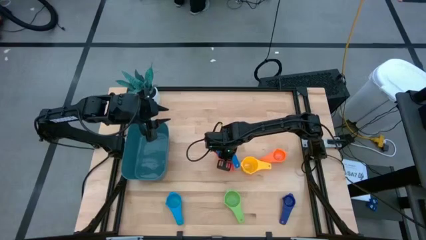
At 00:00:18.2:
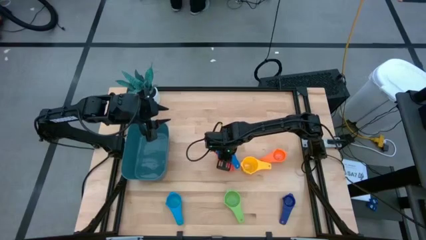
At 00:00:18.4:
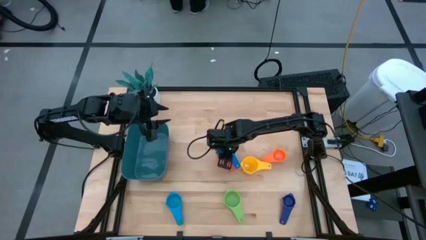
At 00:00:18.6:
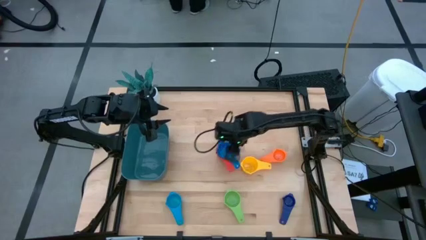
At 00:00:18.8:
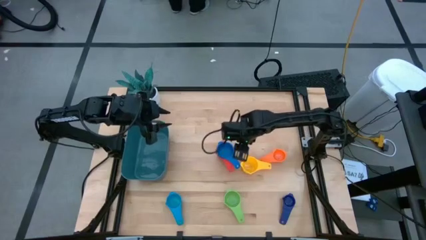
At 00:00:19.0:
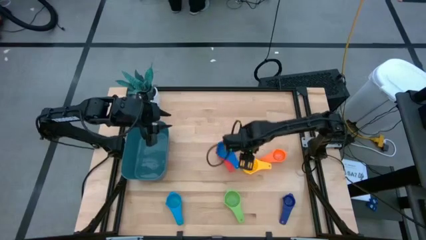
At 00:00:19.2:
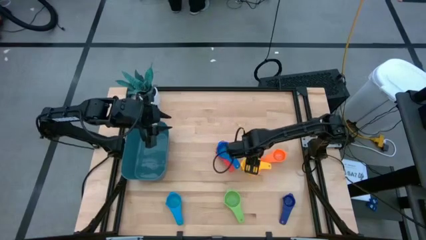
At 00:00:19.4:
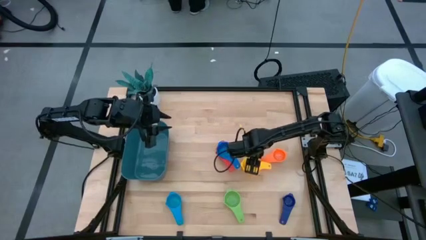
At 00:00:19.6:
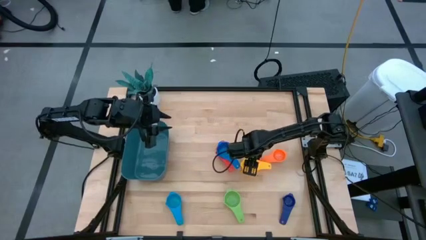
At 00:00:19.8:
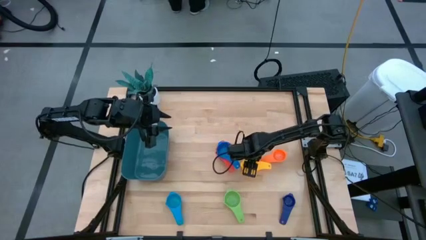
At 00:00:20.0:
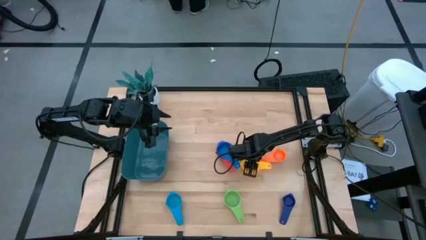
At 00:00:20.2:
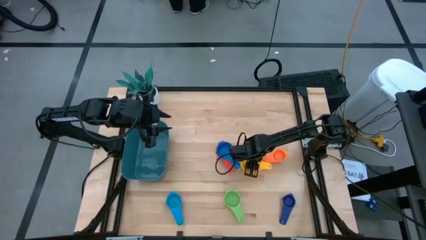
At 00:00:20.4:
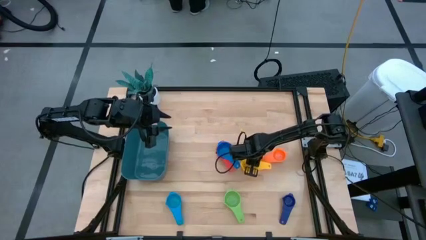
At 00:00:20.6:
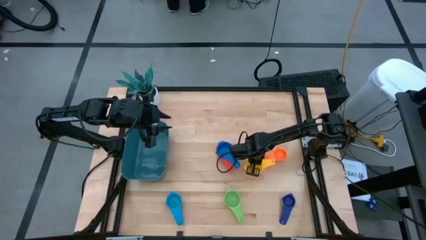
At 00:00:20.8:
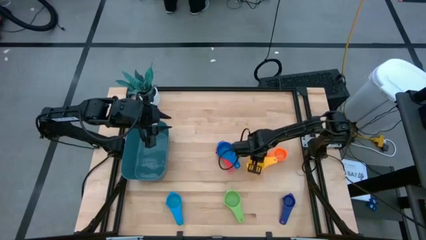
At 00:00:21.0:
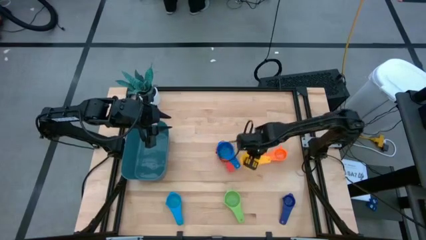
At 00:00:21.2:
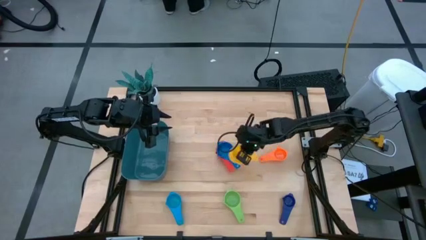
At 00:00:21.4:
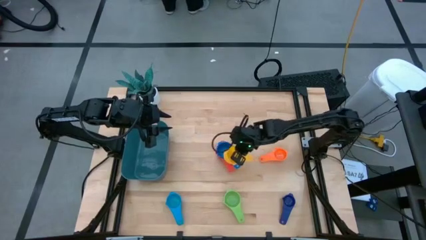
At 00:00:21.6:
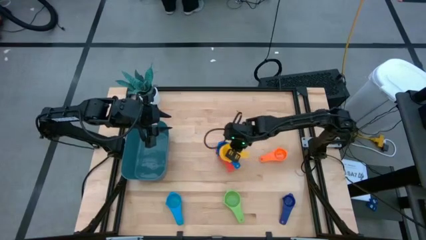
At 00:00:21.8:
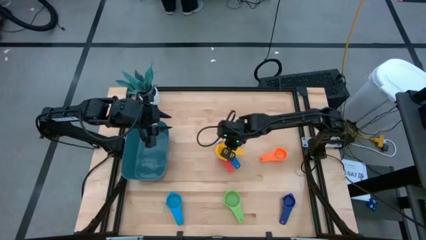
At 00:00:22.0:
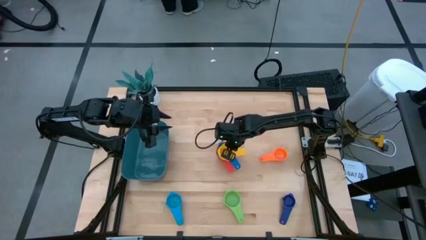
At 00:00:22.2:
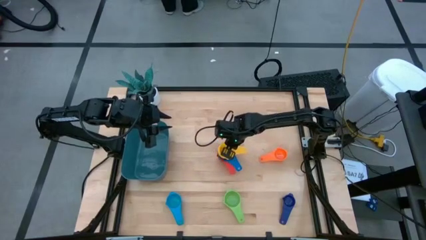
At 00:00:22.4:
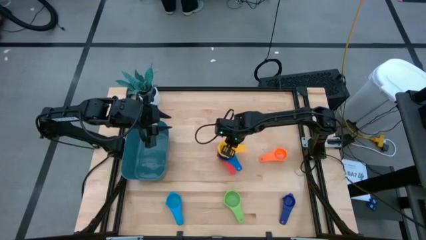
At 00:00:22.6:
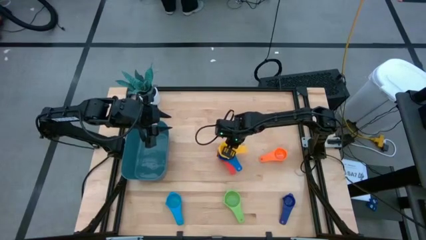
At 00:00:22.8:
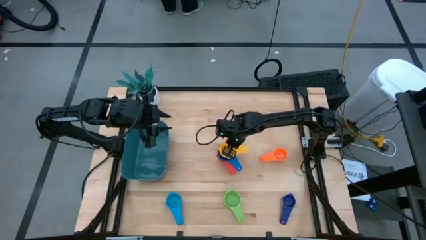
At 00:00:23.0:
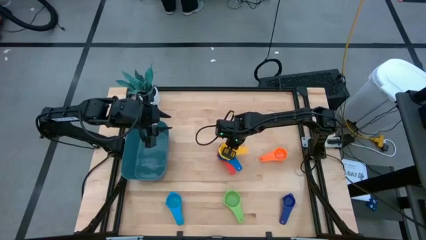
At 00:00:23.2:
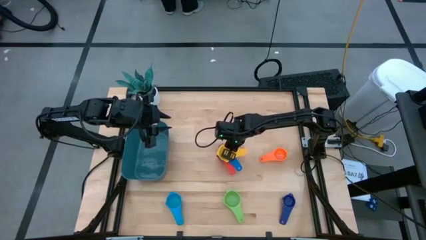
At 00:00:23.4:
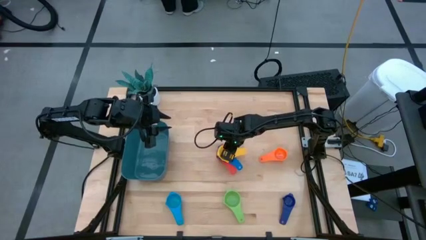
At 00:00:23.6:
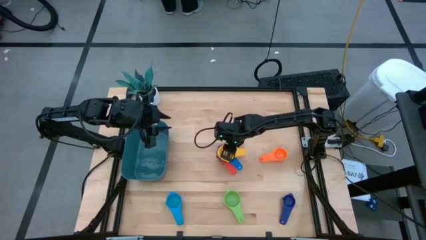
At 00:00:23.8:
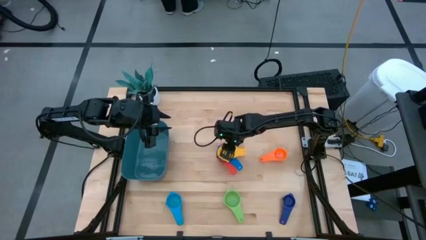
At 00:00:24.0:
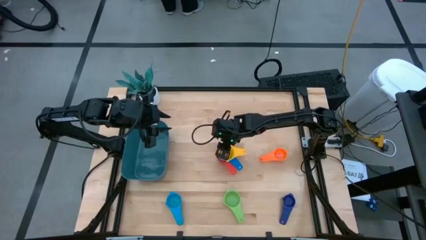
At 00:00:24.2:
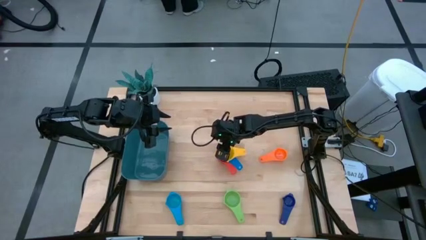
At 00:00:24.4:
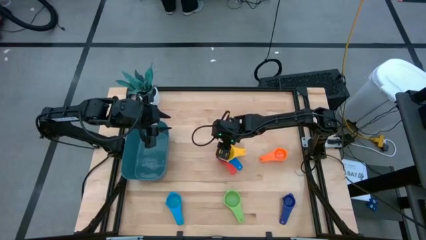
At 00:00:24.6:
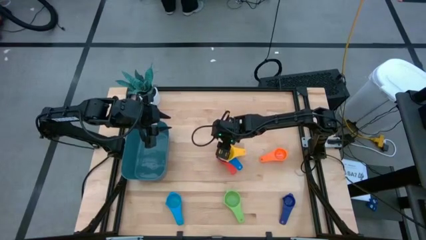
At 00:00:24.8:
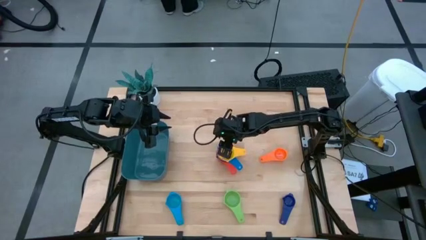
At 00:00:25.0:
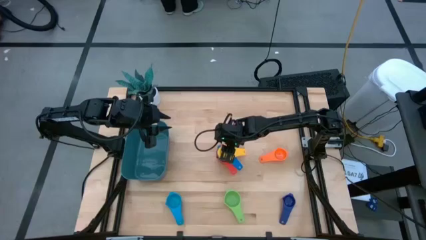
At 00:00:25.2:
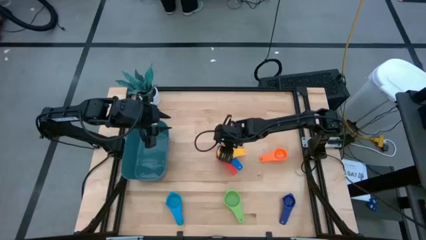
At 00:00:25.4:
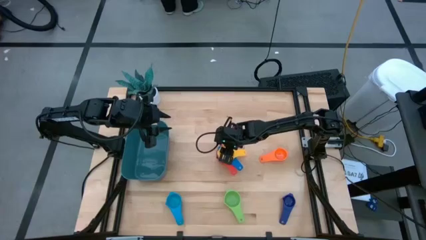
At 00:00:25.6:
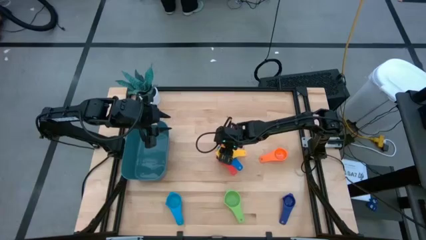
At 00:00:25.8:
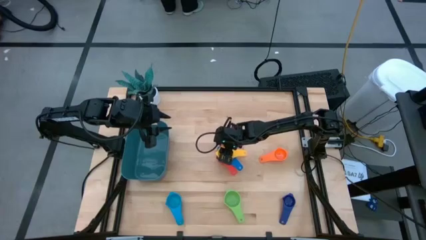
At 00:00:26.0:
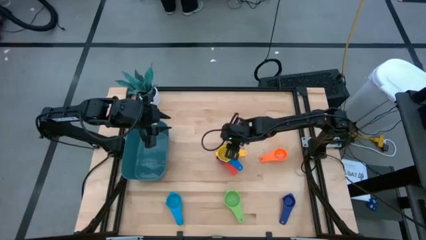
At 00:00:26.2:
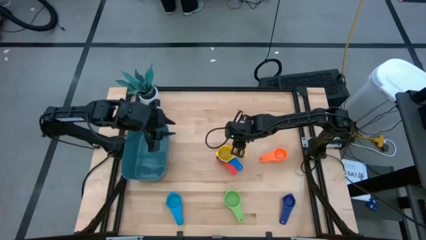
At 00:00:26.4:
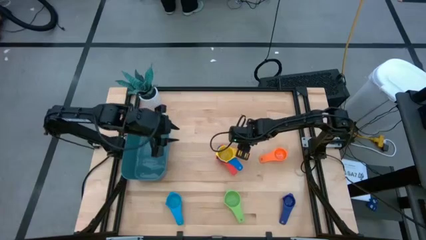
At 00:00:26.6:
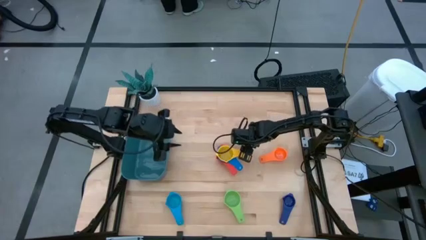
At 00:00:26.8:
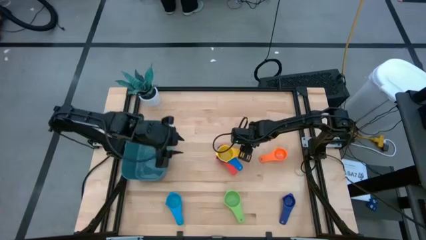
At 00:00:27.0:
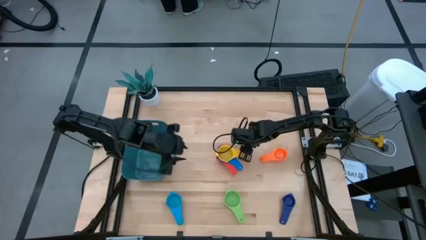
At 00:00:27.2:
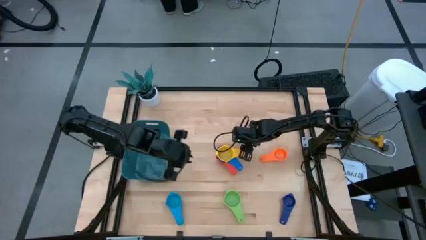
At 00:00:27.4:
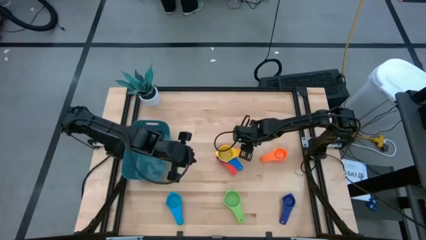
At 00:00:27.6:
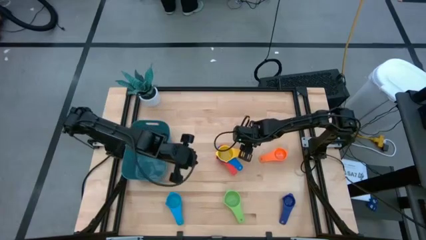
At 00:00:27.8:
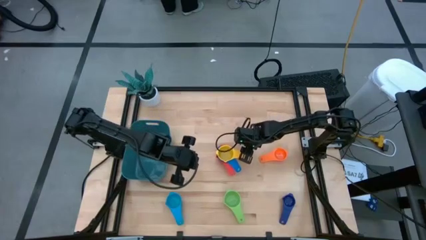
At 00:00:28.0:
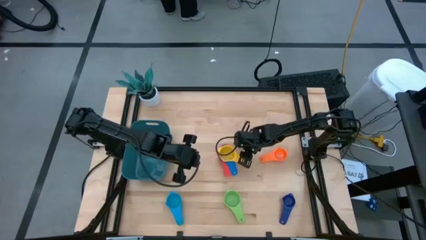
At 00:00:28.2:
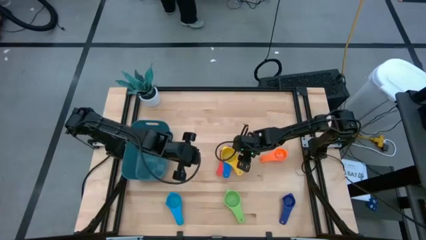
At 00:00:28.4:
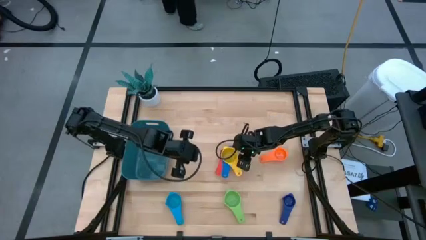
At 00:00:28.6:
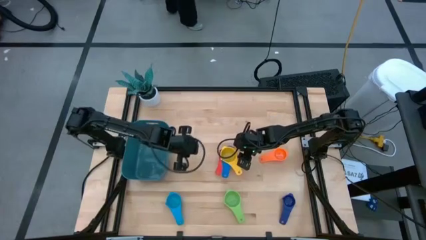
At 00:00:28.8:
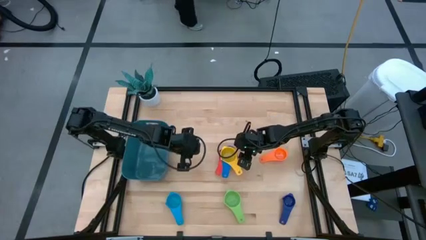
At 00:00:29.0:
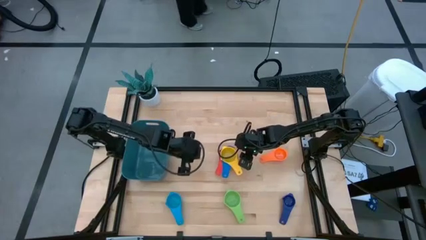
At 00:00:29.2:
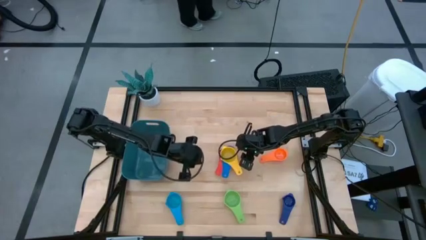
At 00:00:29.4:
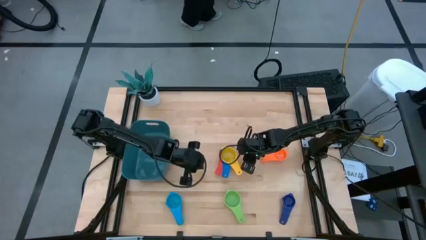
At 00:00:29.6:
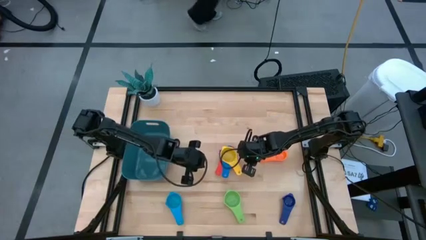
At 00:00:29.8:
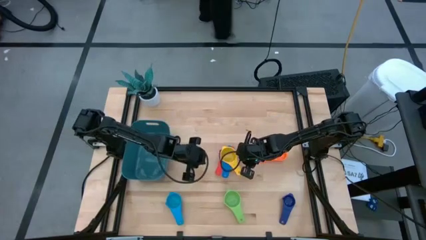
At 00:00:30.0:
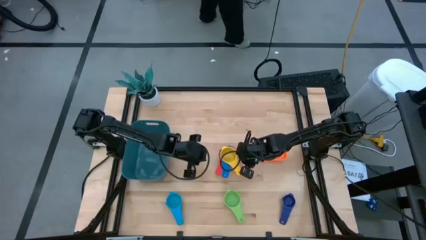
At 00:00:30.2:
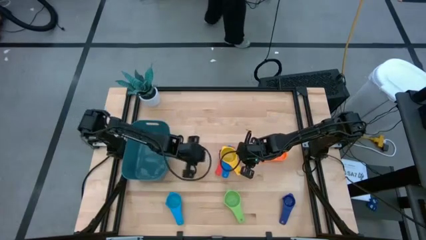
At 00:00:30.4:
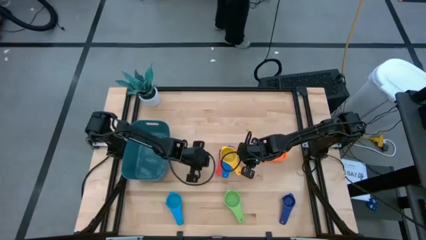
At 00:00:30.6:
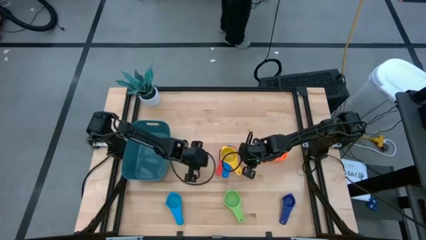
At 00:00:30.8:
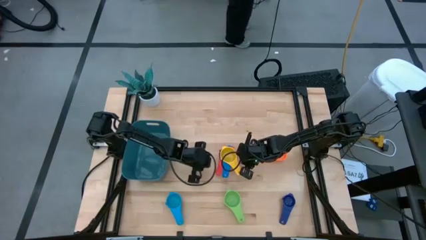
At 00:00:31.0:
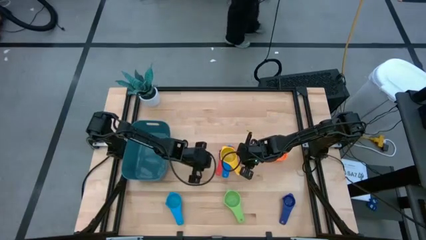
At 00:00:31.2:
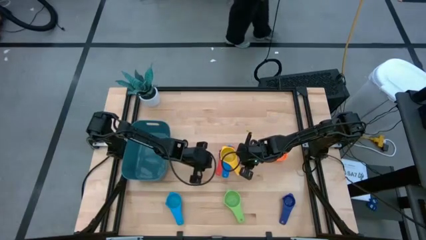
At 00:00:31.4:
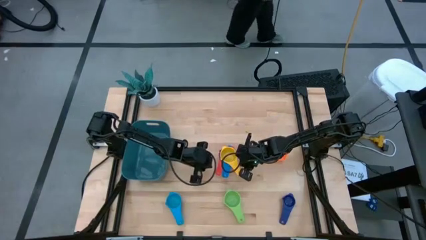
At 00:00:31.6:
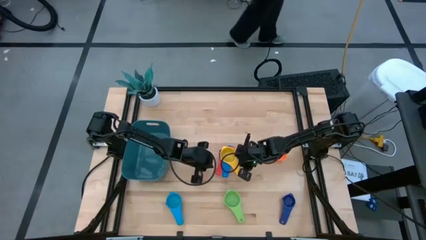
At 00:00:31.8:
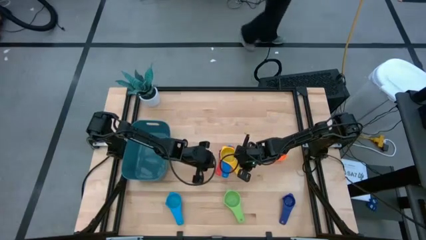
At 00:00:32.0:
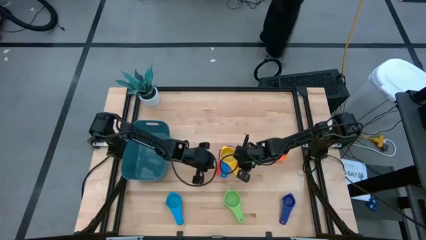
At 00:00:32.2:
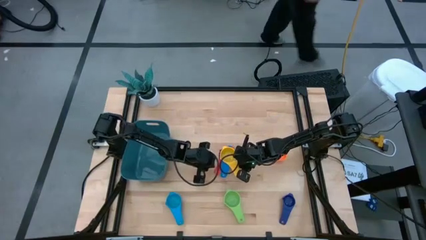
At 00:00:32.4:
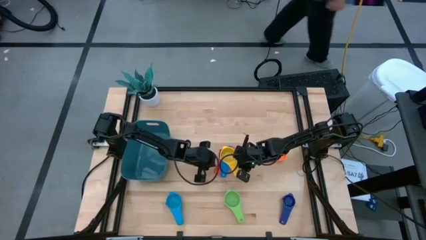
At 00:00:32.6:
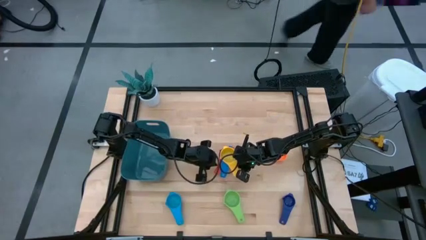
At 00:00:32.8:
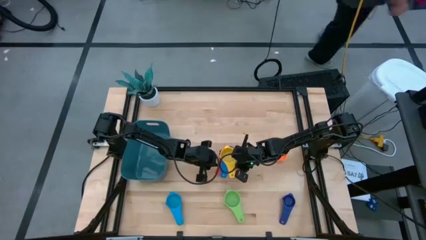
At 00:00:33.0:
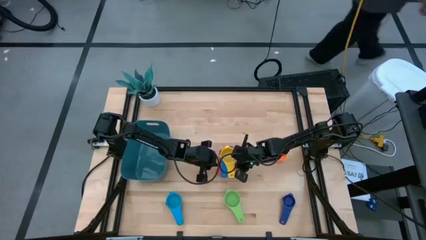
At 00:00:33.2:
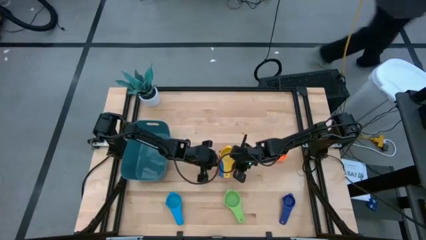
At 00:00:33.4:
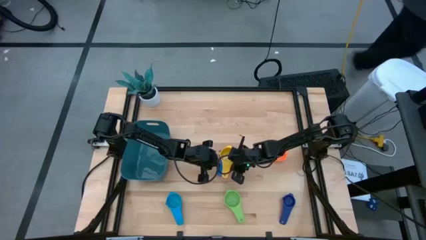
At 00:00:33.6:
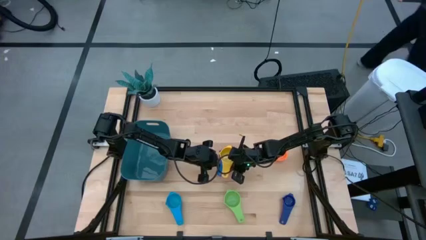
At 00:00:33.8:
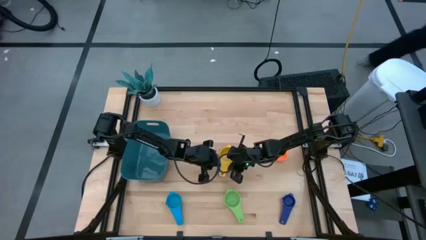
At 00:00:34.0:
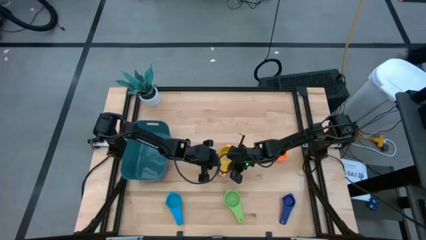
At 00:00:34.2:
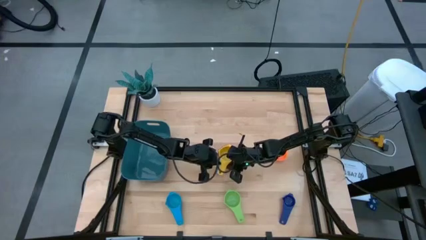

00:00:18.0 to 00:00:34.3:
Task: Nest measuring cups in basket
Stack the yellow measuring cup on top of the blue measuring cup
